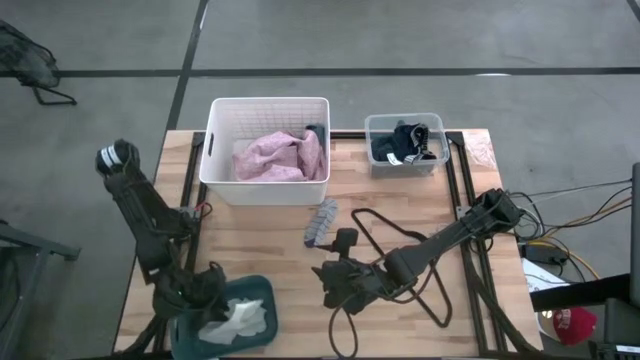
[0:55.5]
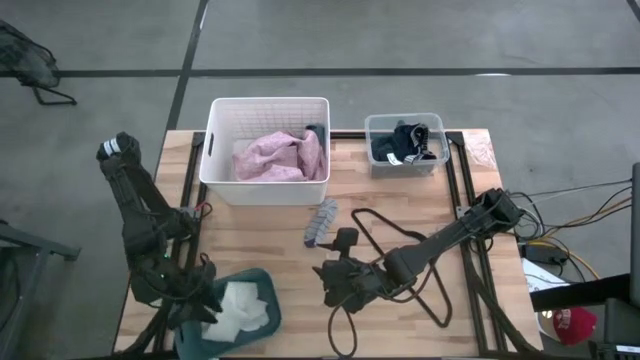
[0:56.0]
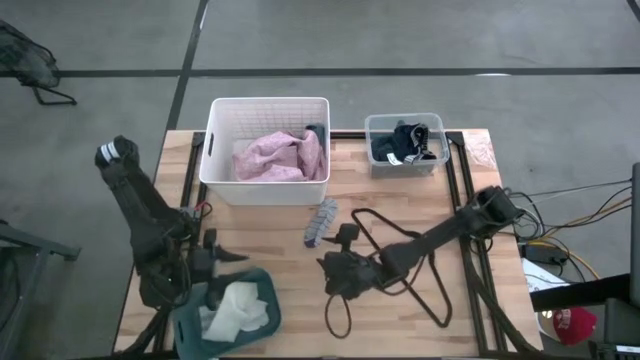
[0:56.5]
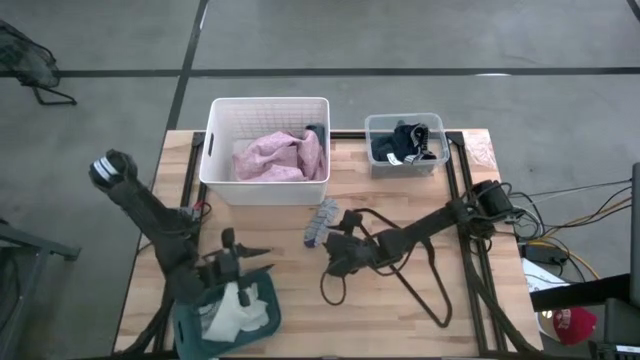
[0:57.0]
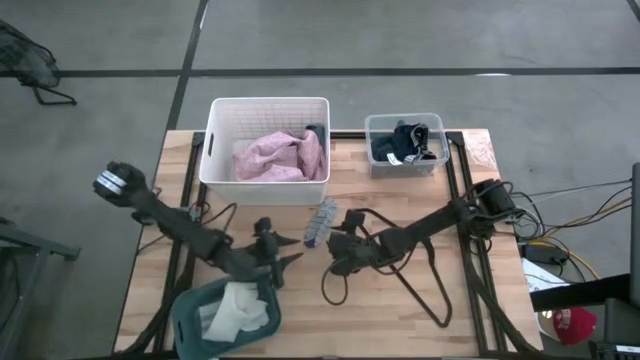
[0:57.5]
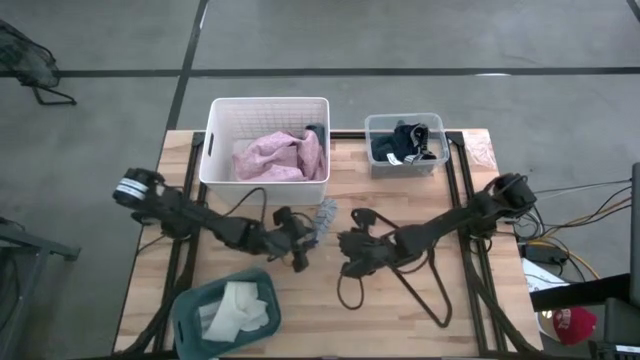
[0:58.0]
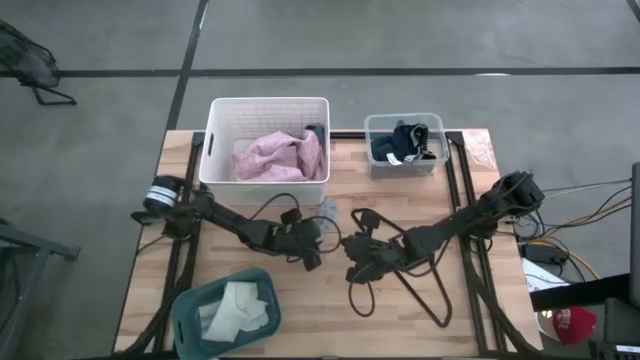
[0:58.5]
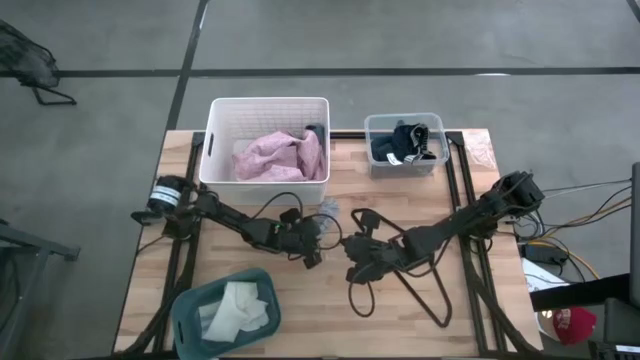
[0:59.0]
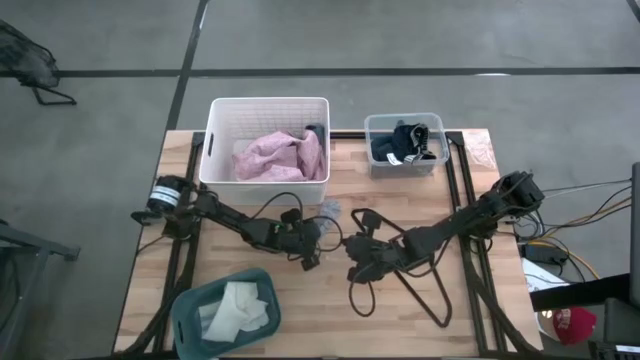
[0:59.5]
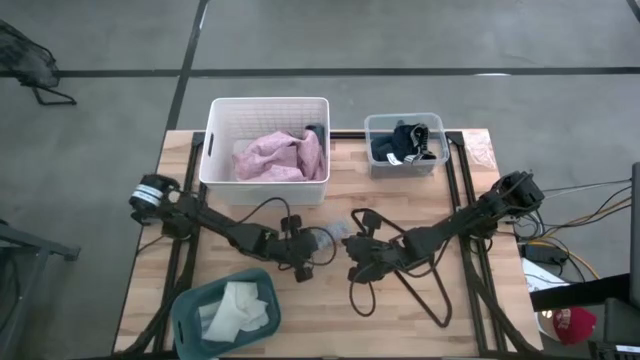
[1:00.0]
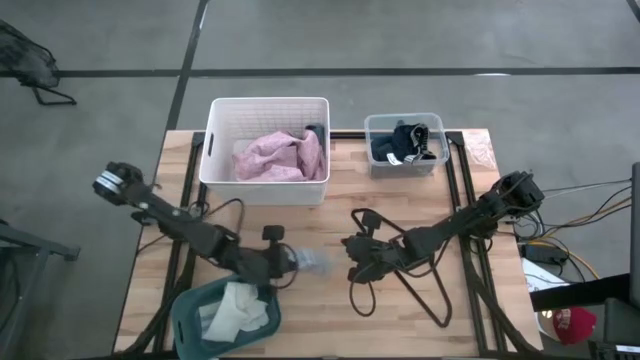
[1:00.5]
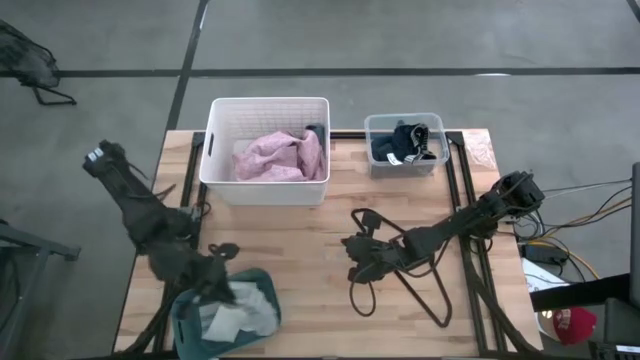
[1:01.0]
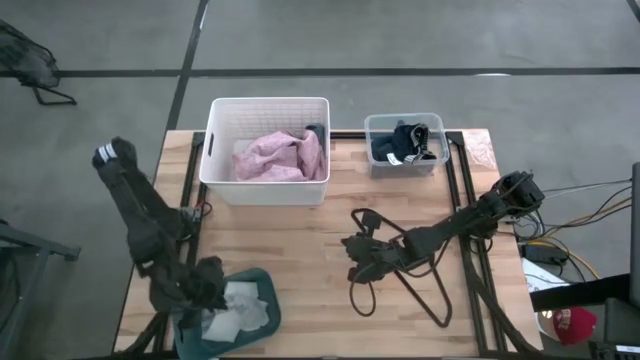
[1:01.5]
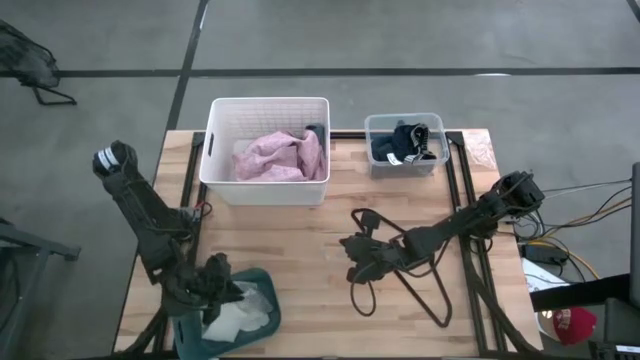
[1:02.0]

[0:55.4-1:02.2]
Task: Pick & Place Cloths
Put the gray sock in the blue bin

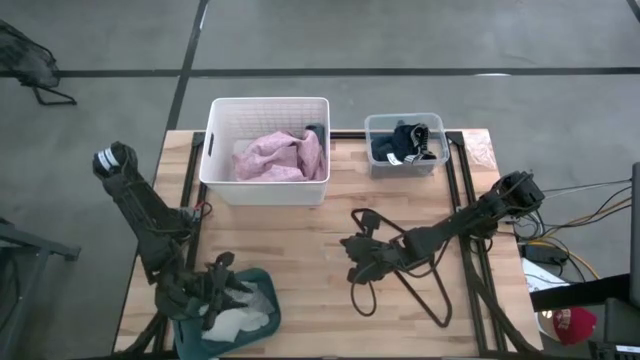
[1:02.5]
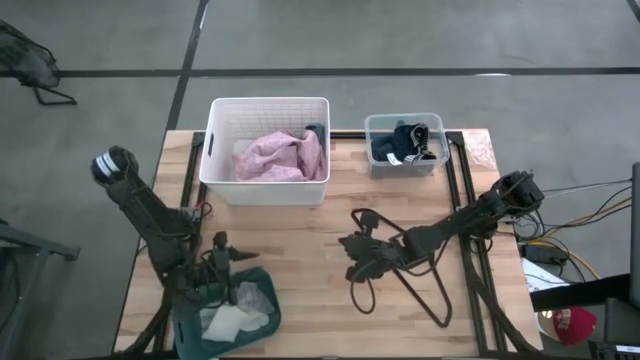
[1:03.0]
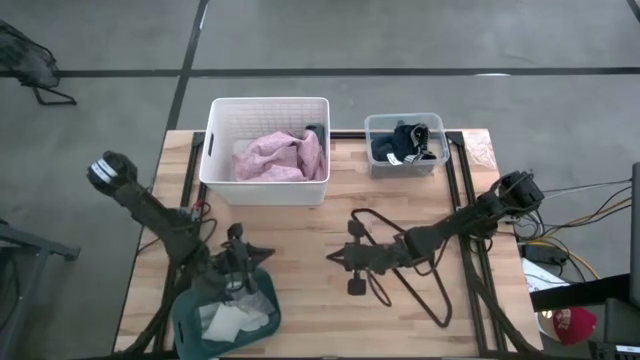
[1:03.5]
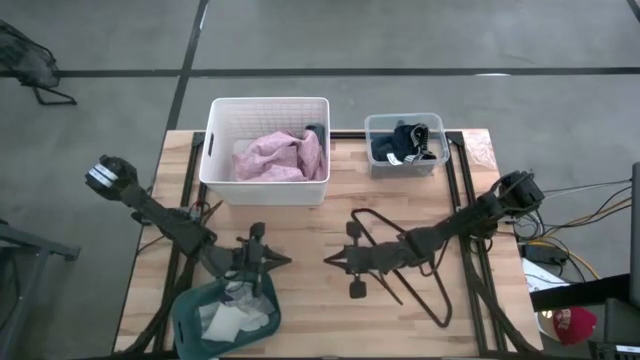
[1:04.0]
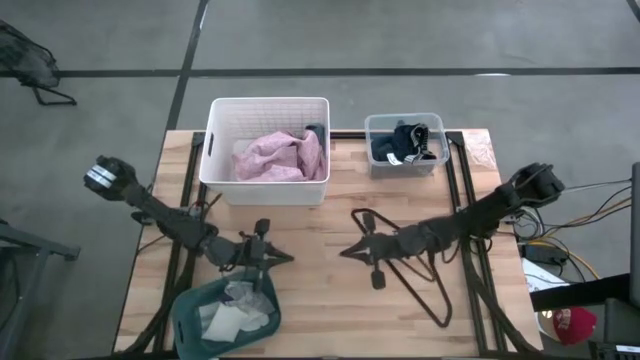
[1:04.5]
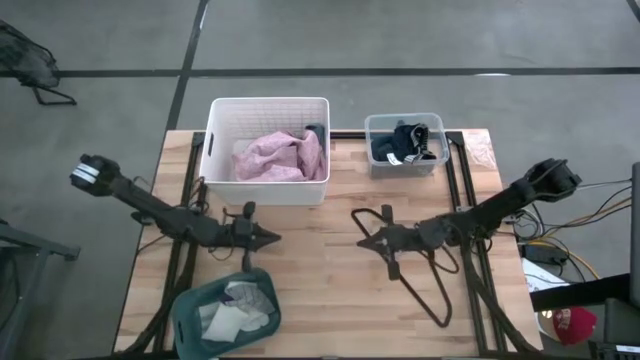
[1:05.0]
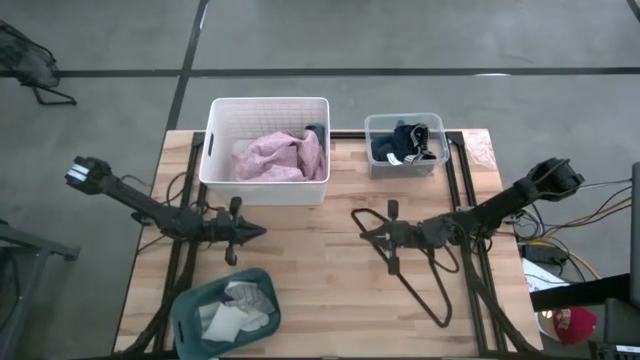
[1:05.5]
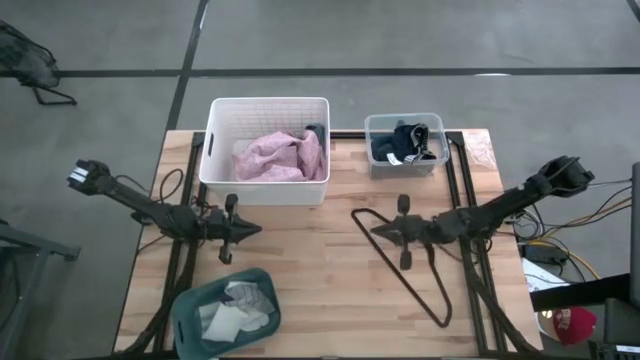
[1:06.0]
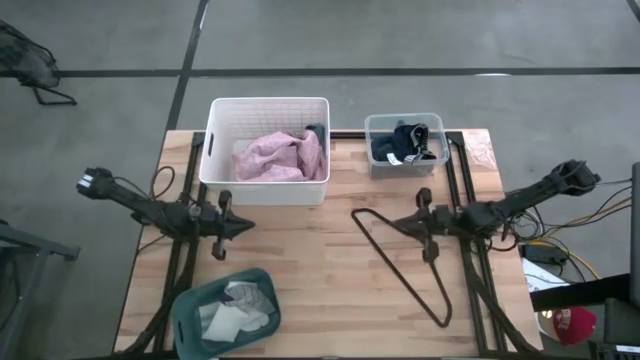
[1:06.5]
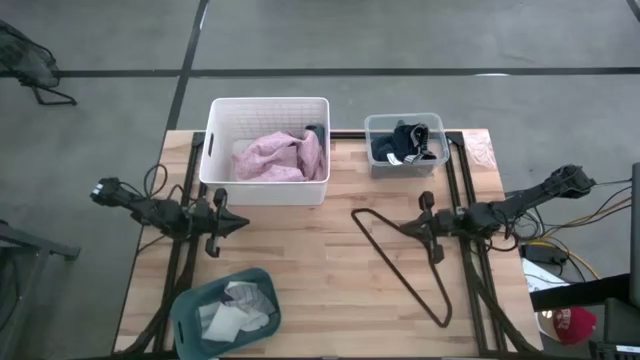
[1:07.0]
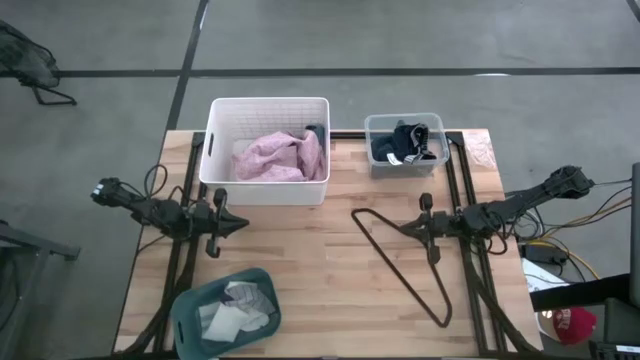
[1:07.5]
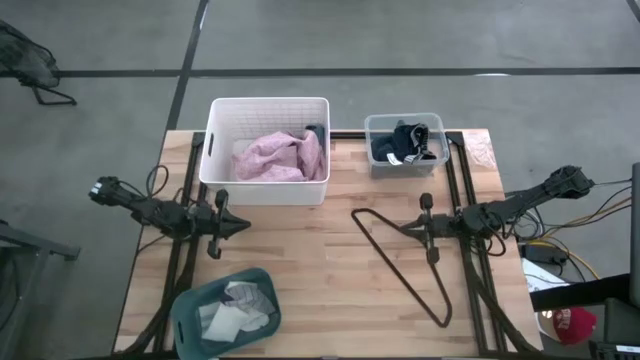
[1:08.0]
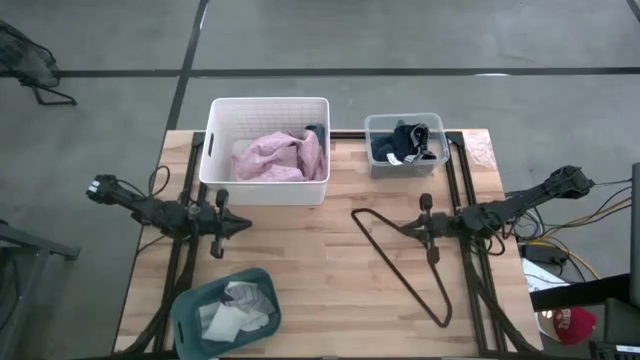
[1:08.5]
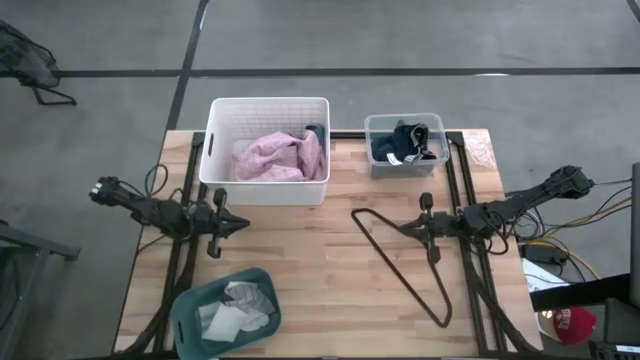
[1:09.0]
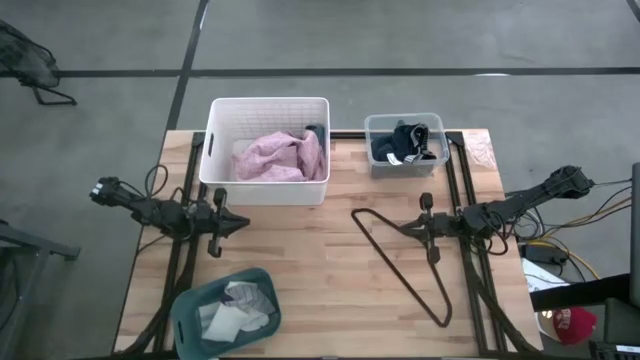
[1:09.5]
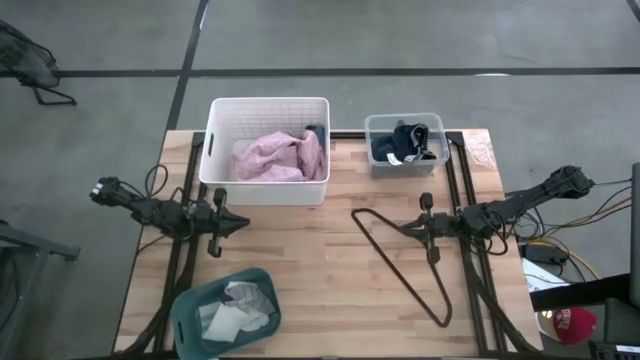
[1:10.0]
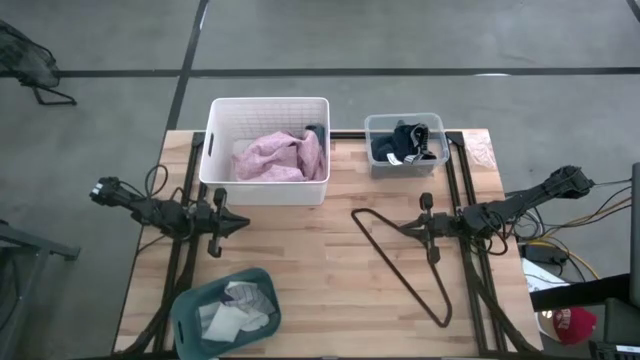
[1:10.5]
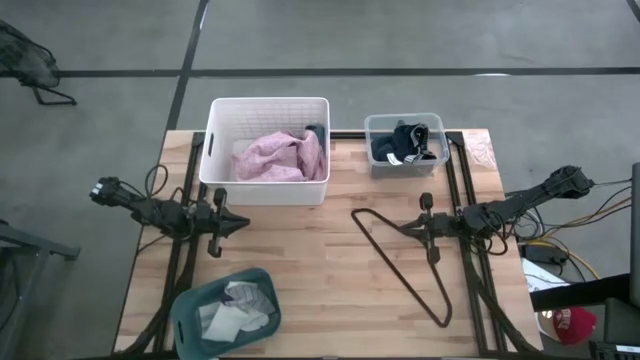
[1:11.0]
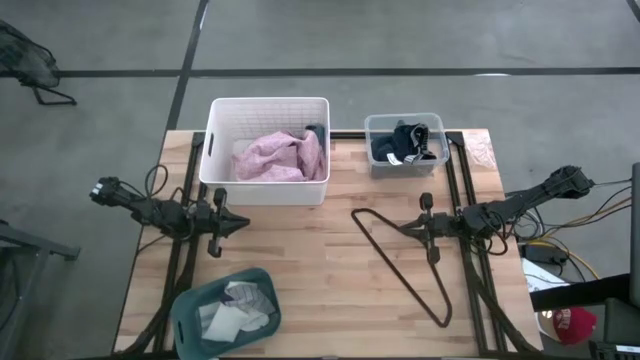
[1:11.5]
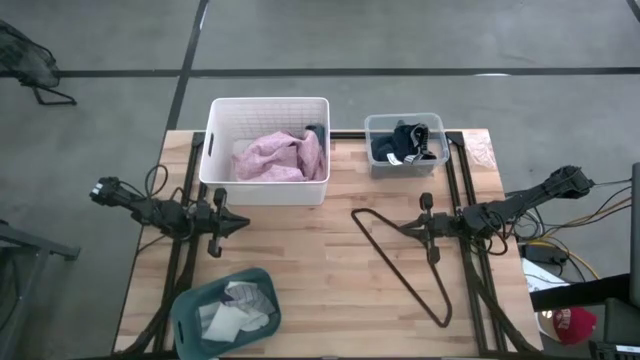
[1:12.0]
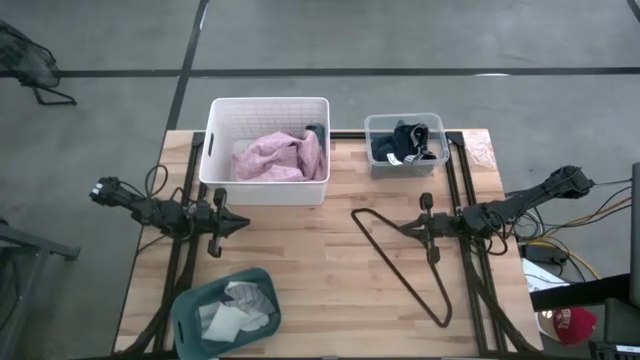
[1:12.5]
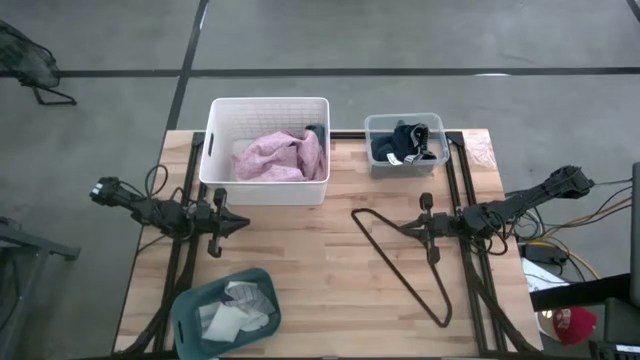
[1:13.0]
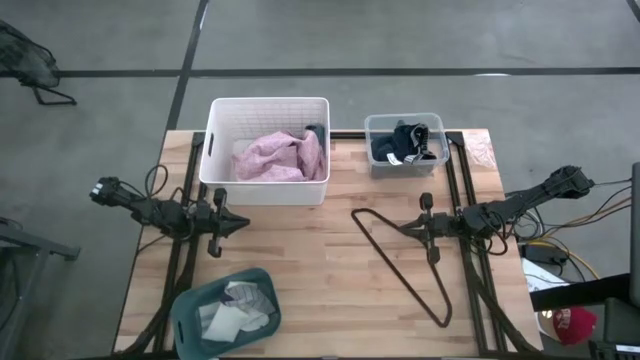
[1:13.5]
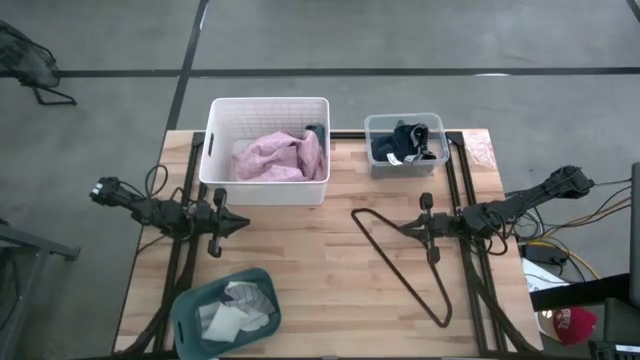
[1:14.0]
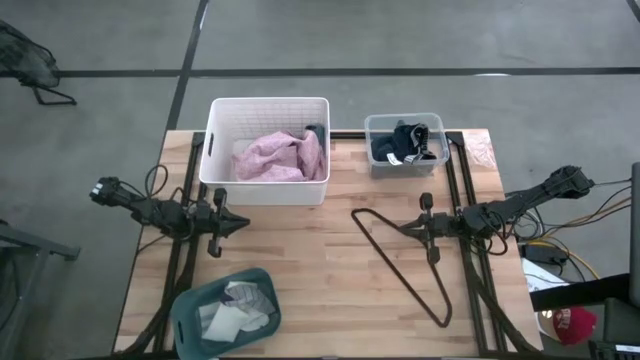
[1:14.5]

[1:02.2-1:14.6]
Return to Home Position

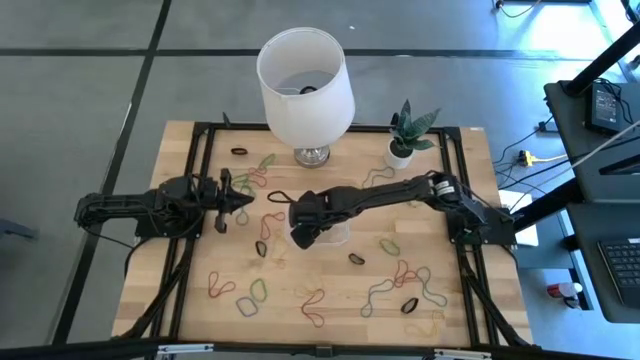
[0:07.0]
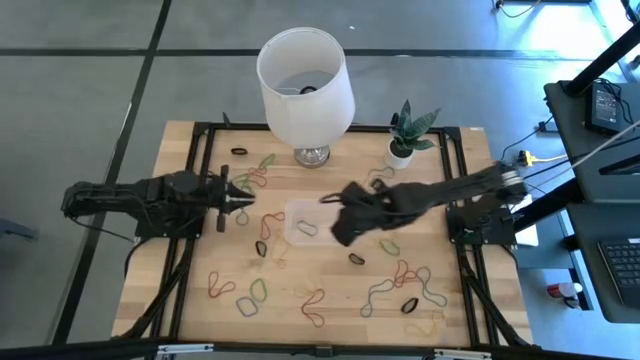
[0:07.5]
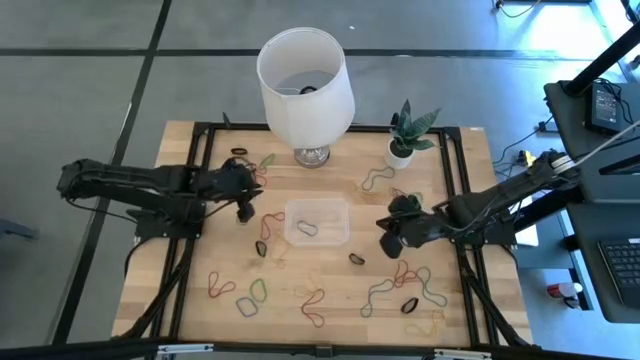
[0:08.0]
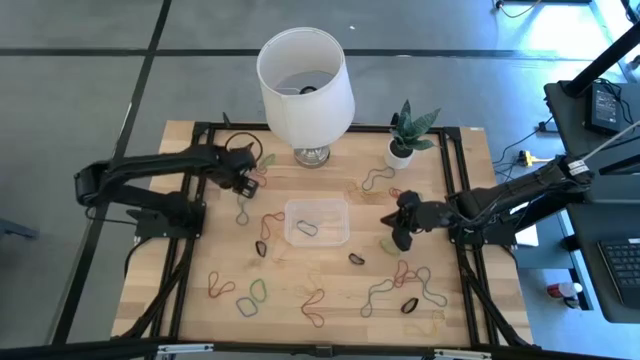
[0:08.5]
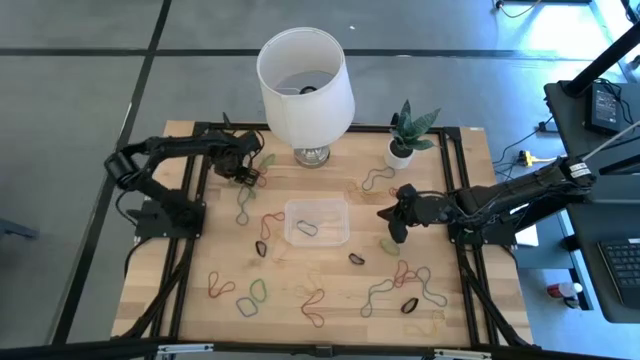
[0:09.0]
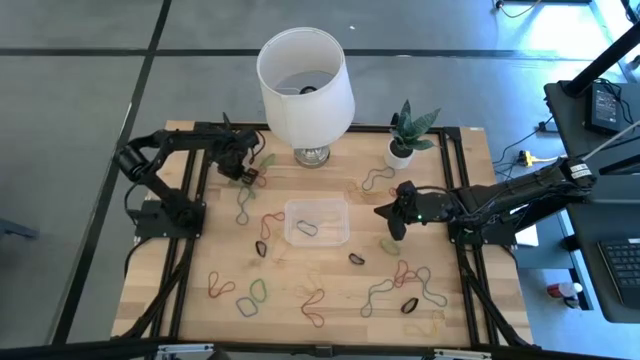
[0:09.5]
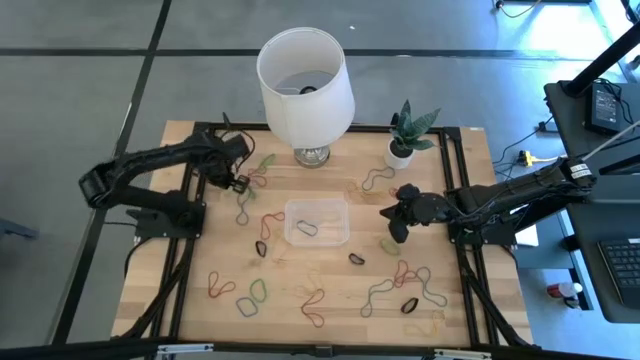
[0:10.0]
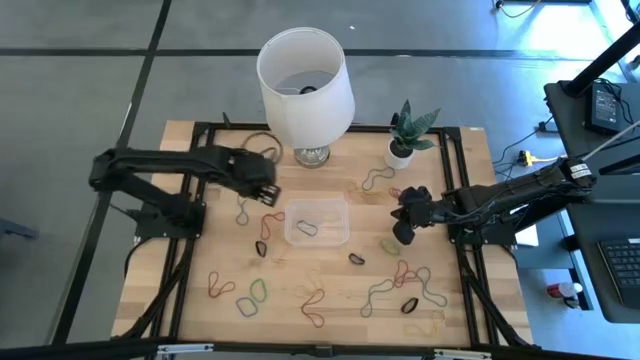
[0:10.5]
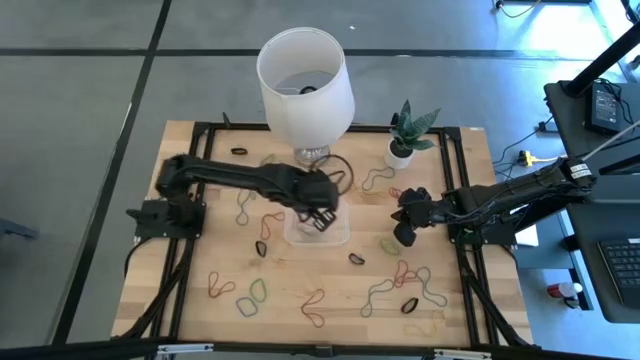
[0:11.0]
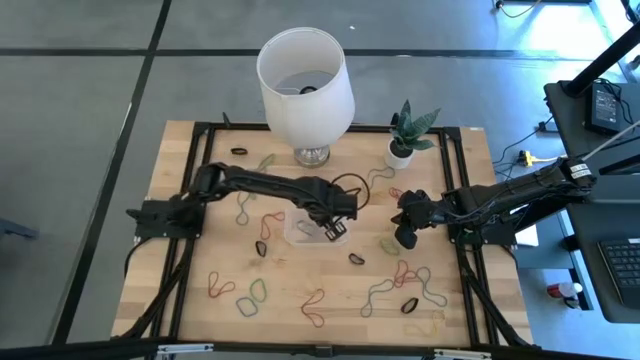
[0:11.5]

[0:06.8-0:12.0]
Task: Pick and place rubber bands into bin
Put the green rubber band into the transparent bin
